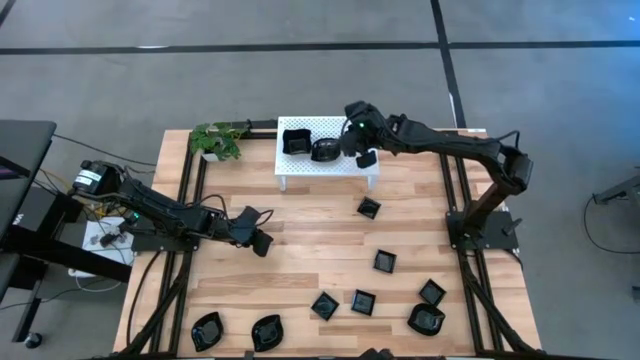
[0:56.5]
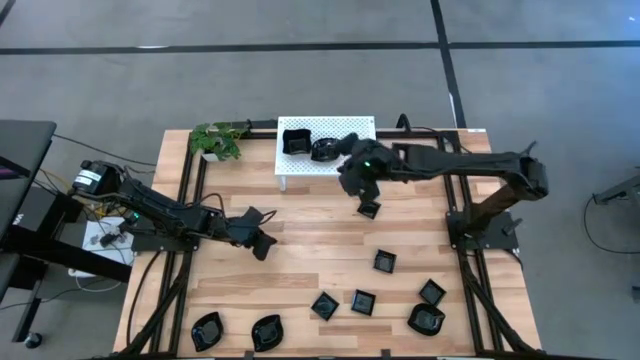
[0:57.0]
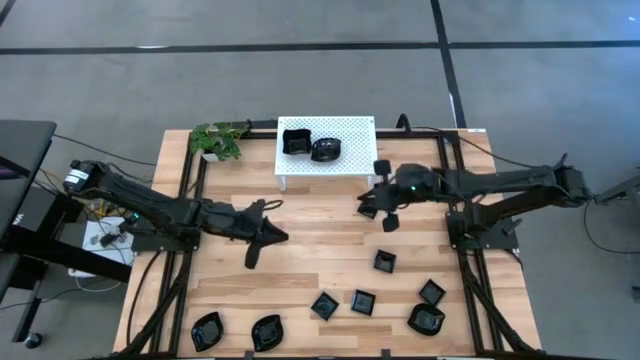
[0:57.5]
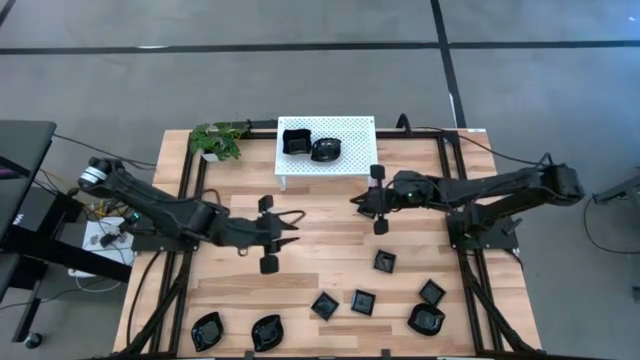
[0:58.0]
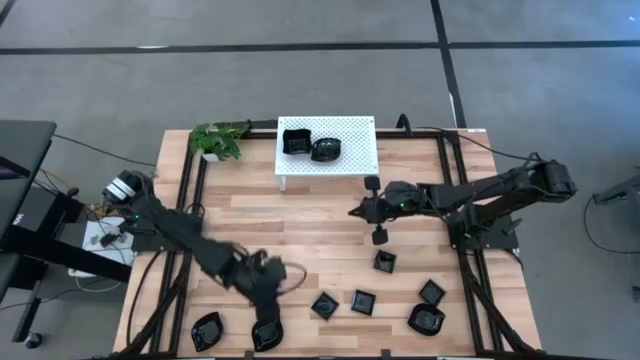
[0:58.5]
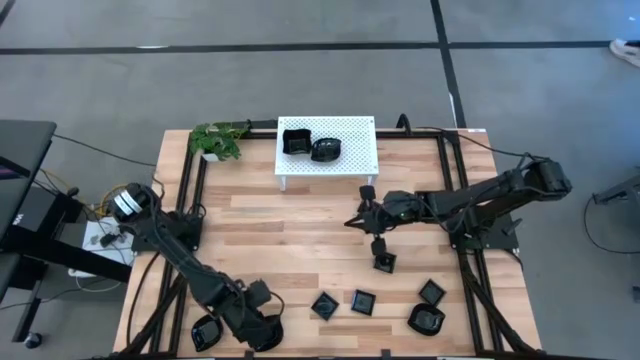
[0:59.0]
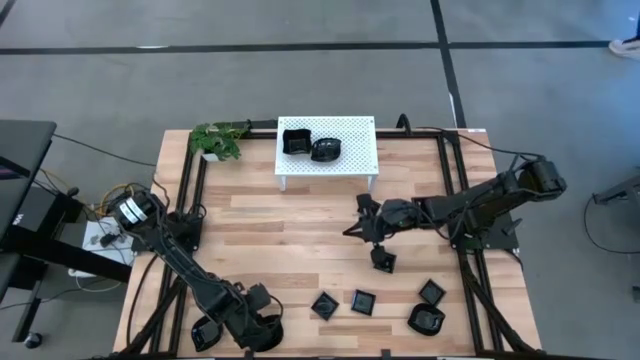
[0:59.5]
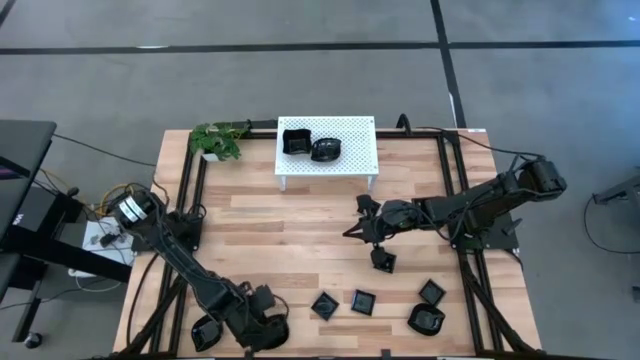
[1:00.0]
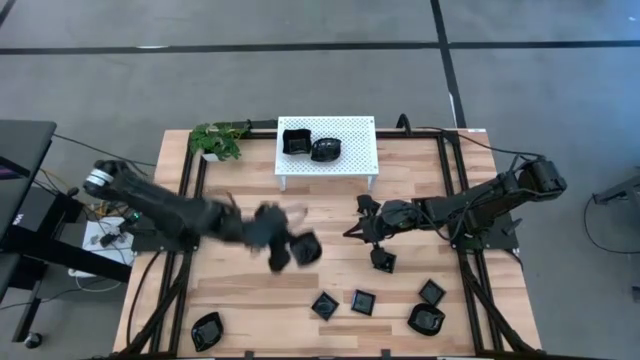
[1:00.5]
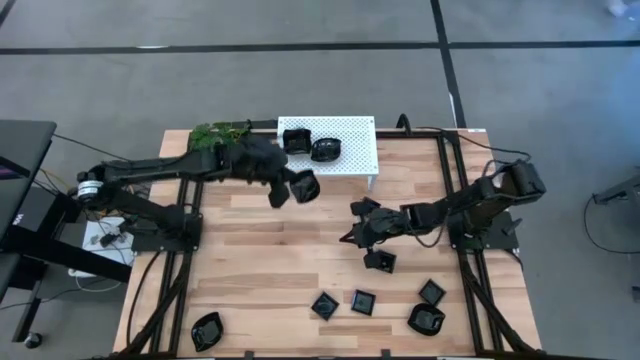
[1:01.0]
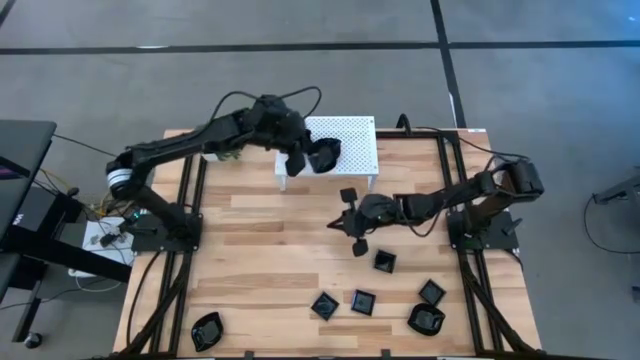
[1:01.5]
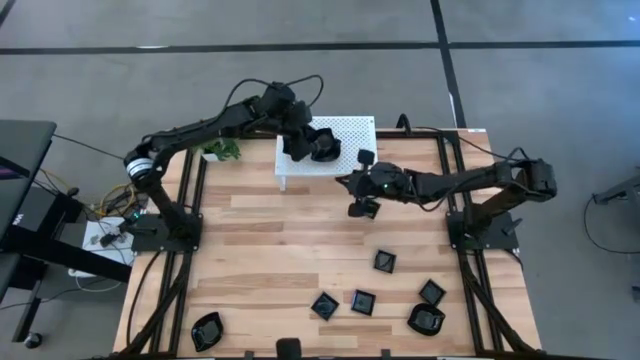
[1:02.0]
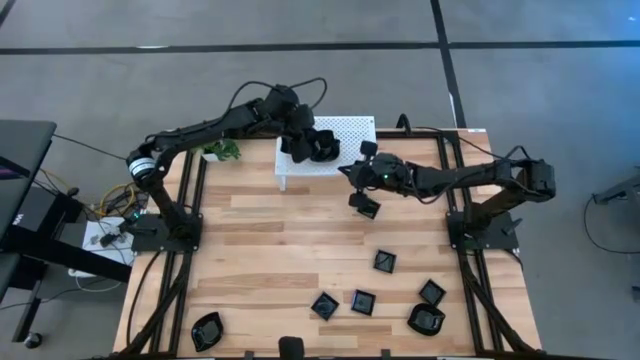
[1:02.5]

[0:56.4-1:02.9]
Task: Pick & Place Mini shaped plates
Stack the black leaf-shaped plate on top of the black leaf-shaped plates on the shelf

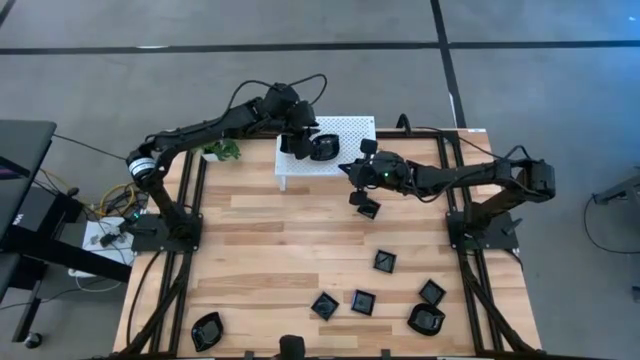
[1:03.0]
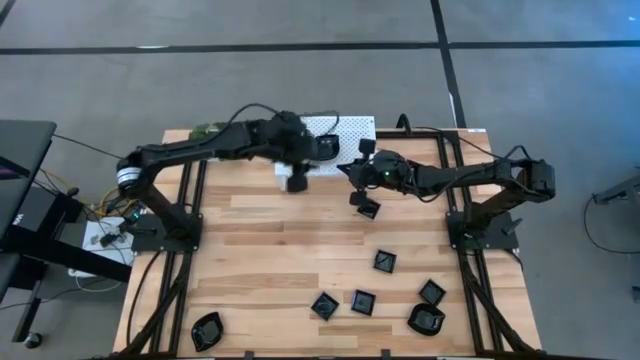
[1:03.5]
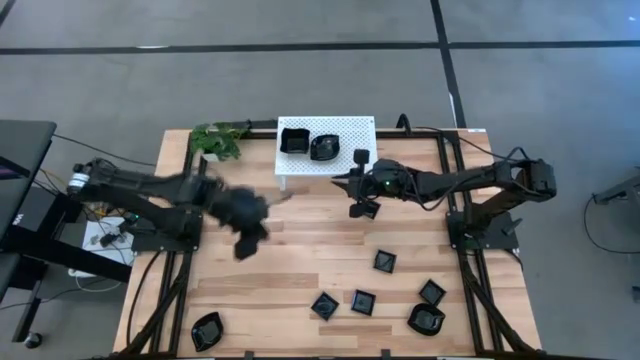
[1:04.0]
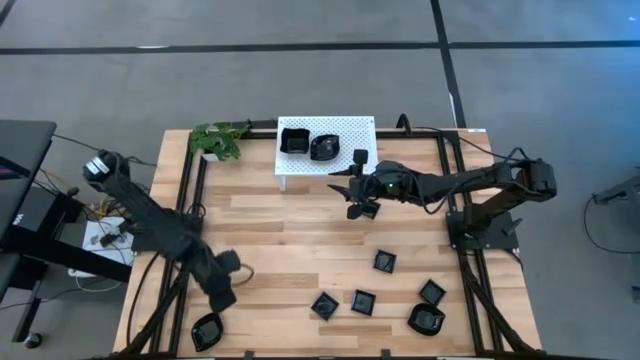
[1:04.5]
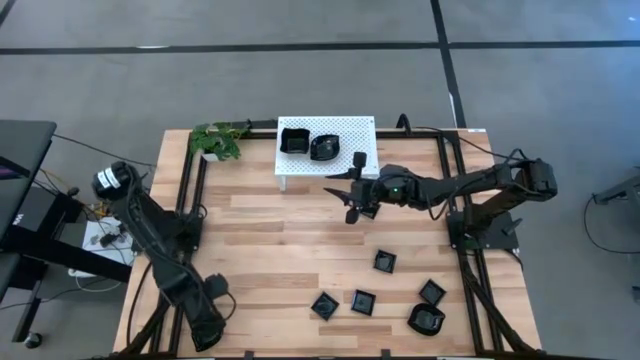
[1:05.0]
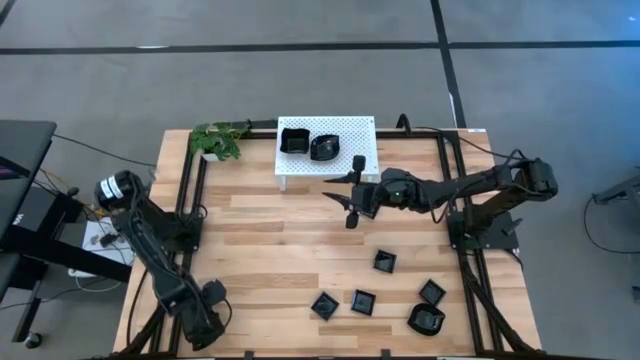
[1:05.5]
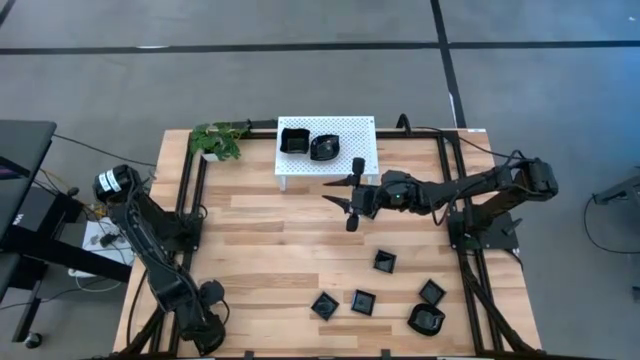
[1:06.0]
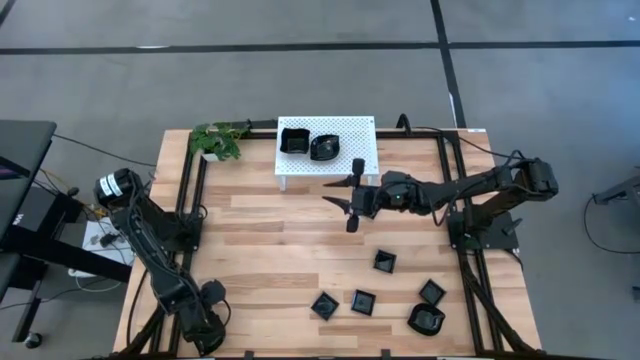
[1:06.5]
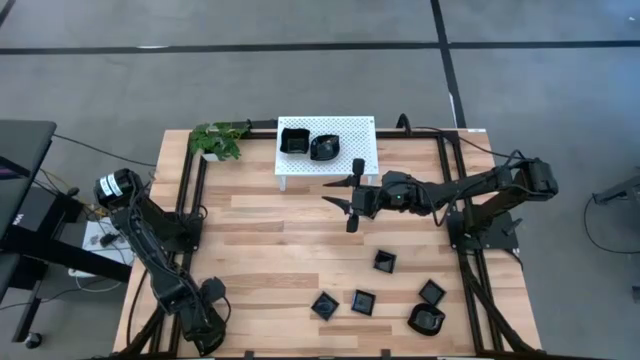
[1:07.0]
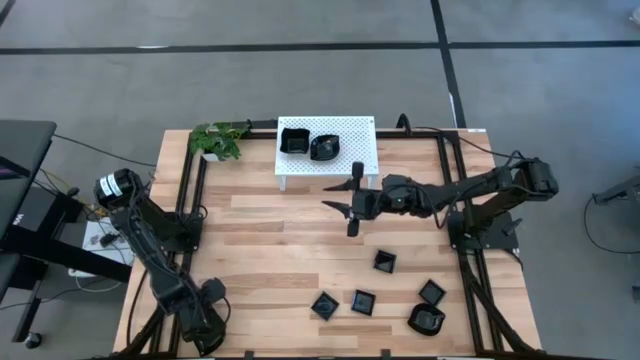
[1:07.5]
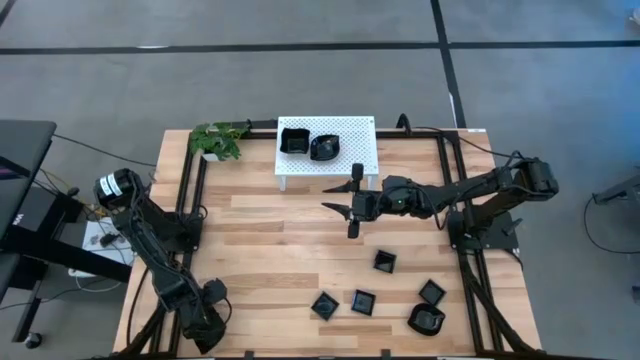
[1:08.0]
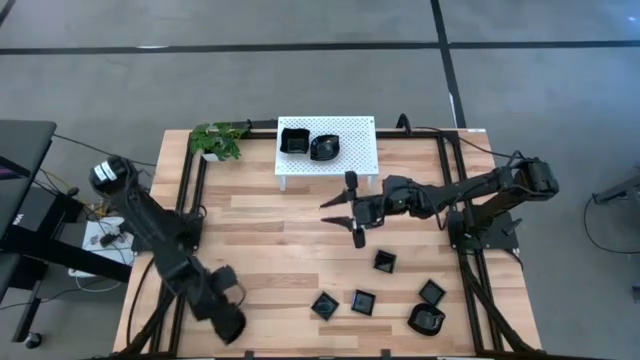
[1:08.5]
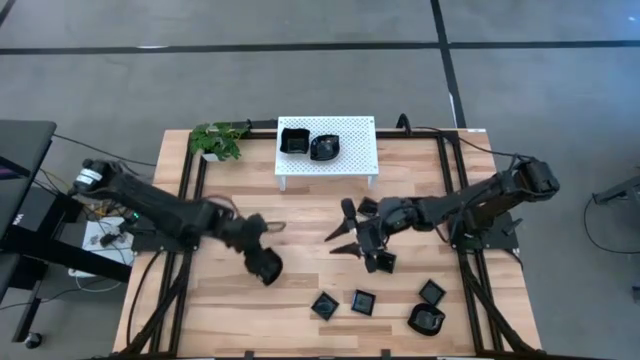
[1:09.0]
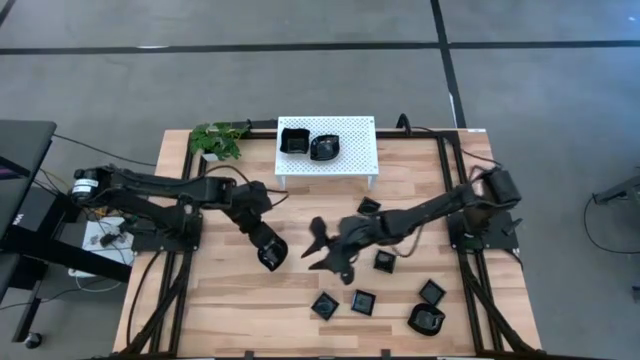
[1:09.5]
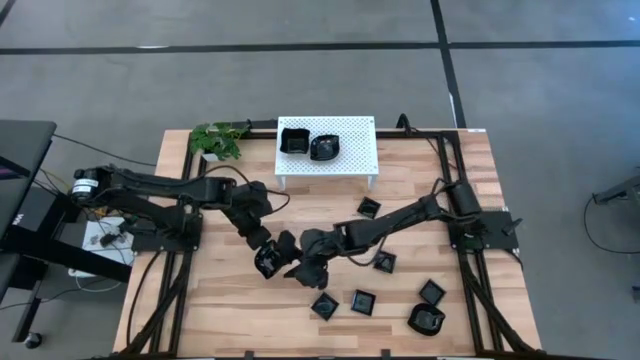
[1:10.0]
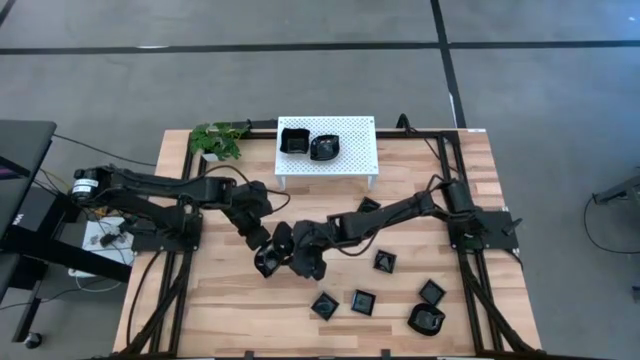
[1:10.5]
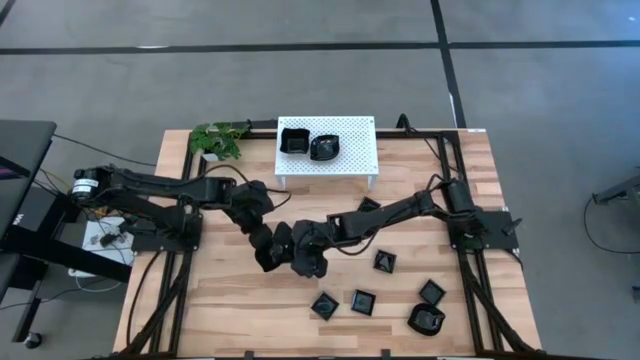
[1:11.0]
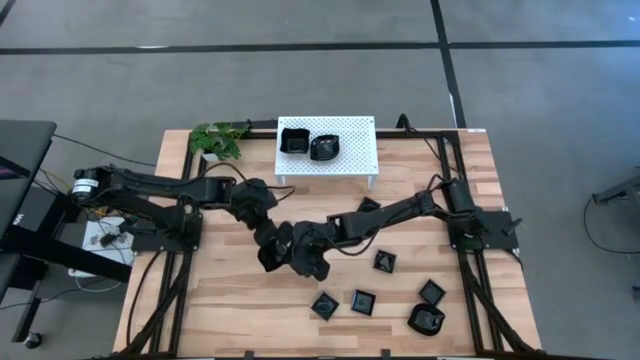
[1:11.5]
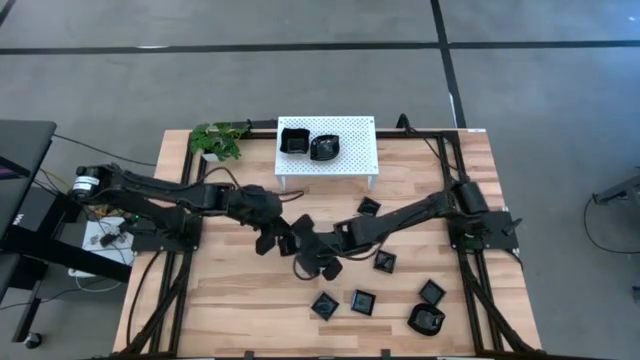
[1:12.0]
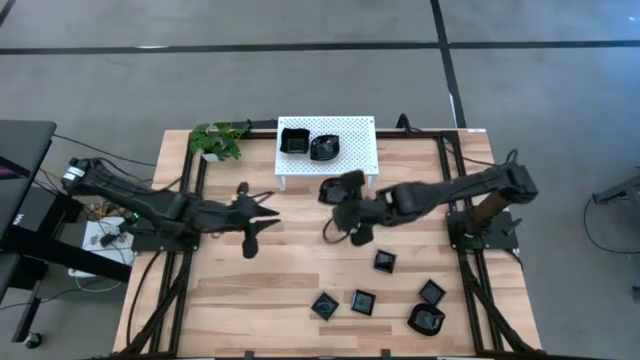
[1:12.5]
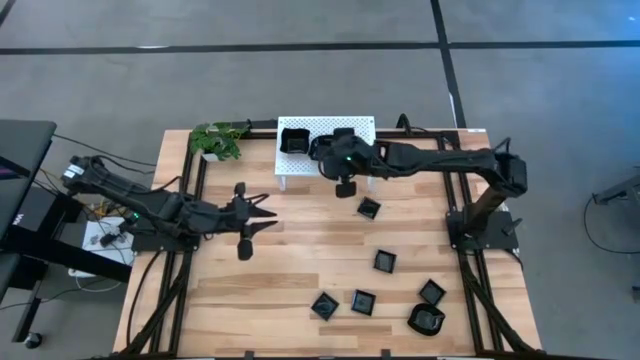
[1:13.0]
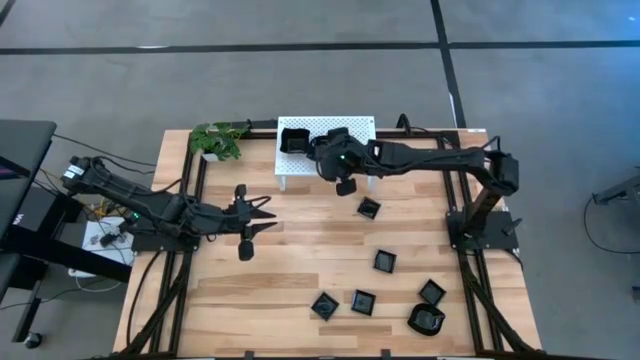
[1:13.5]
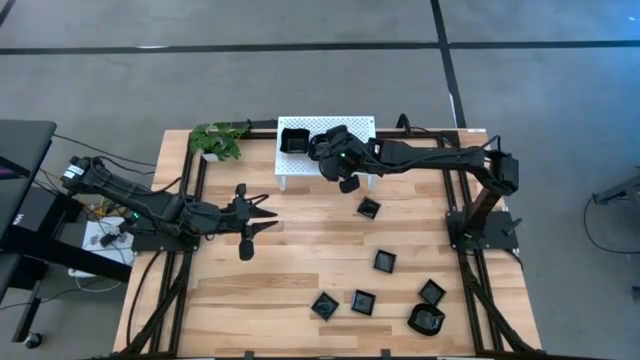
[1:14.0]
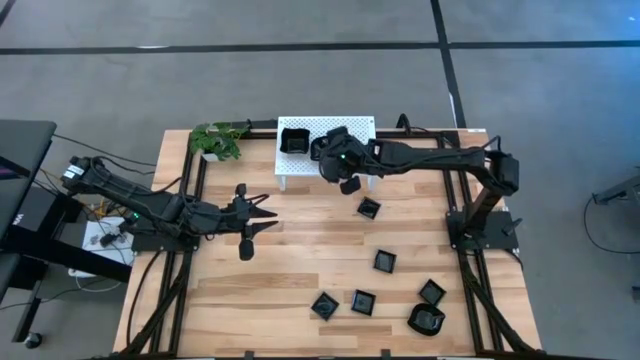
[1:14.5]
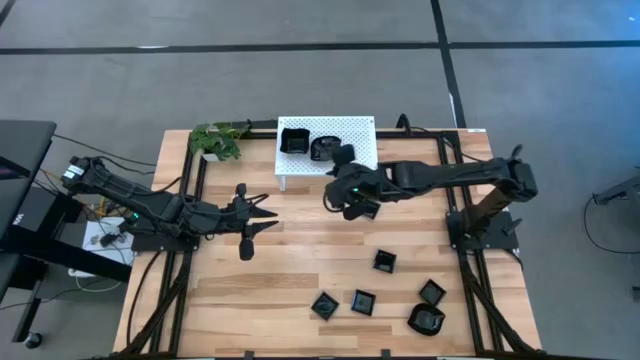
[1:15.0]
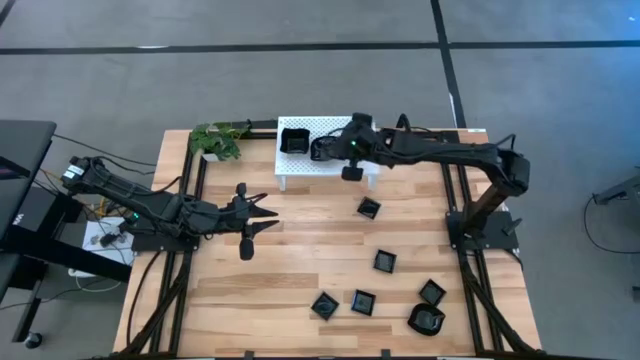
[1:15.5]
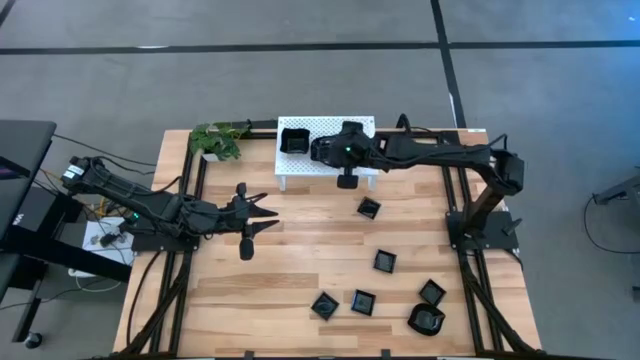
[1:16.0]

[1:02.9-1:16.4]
Stack the black leaf-shaped plate on top of the black leaf-shaped plates on the shelf

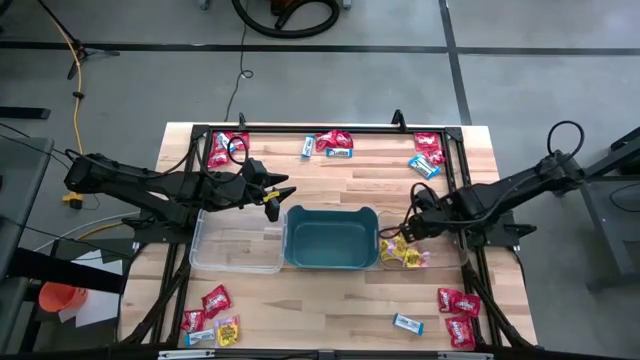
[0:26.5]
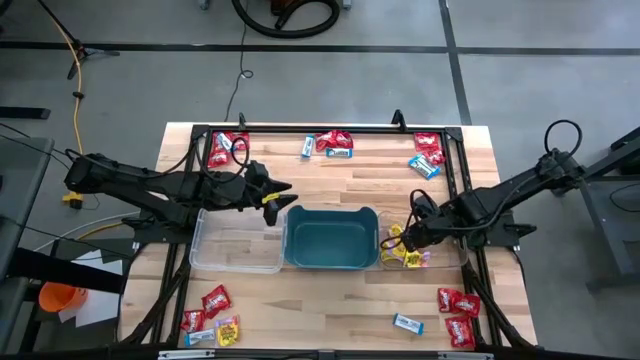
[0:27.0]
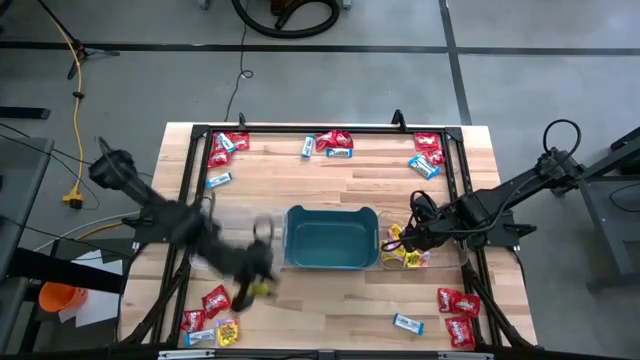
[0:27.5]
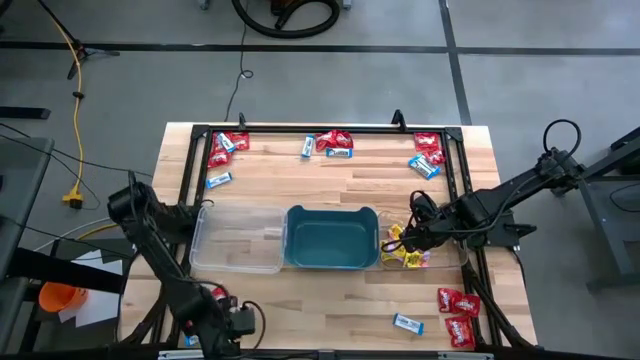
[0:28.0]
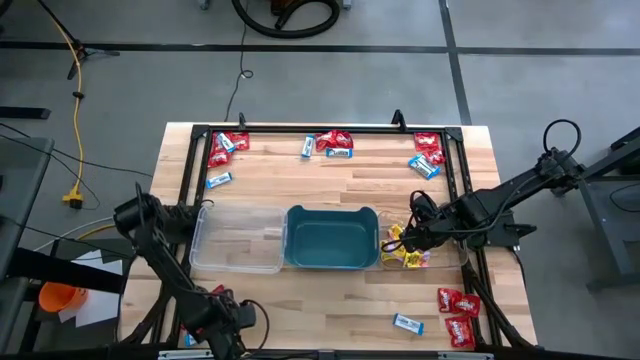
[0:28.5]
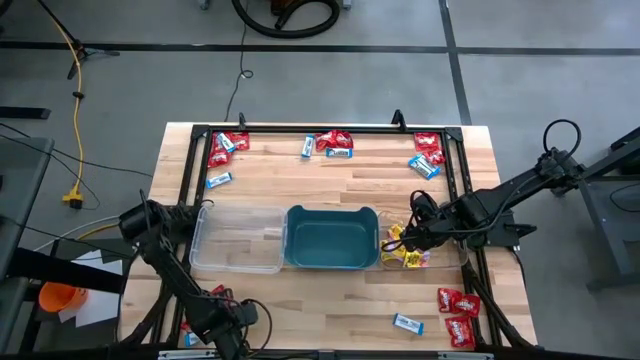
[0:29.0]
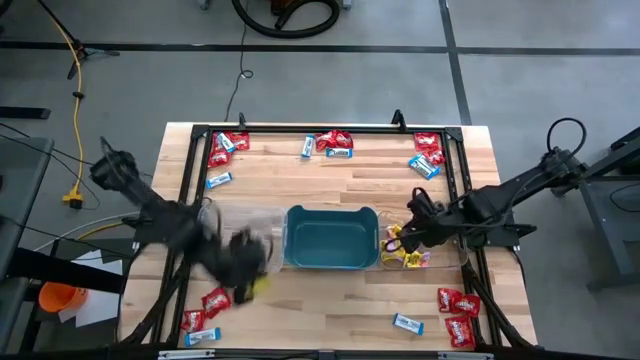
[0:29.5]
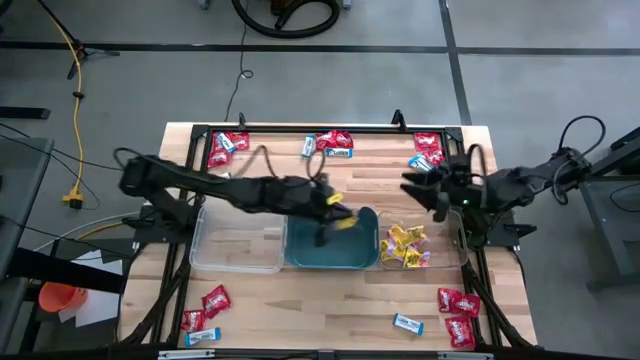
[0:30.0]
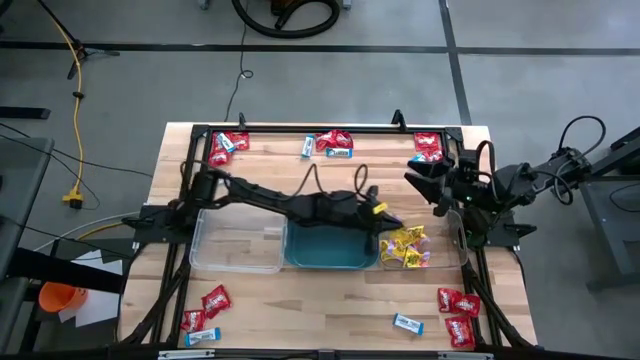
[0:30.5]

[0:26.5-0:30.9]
Task: Sort candy
Put the yellow candy into the right transparent bin
